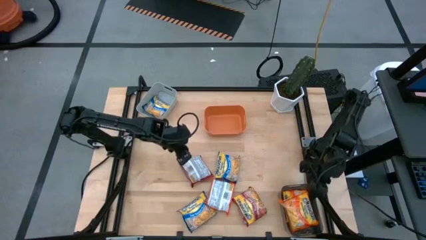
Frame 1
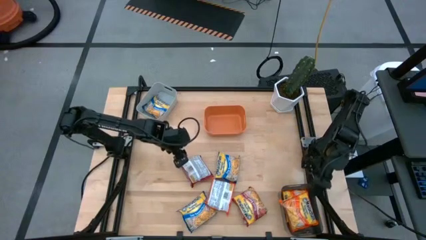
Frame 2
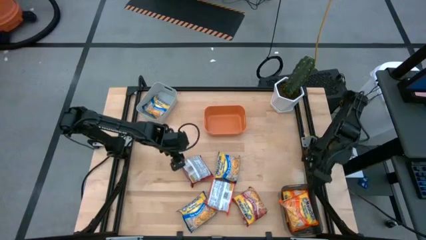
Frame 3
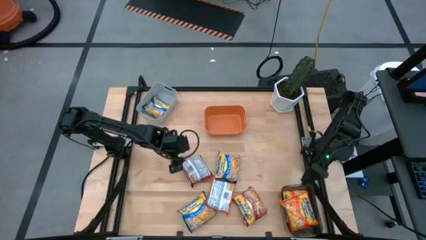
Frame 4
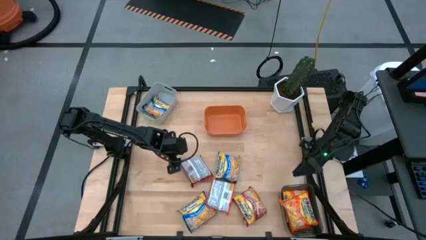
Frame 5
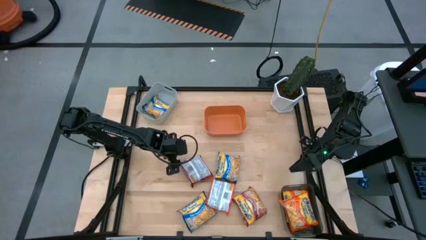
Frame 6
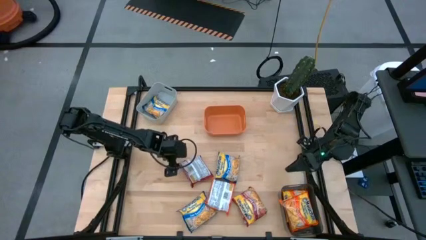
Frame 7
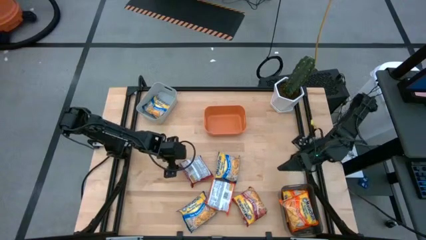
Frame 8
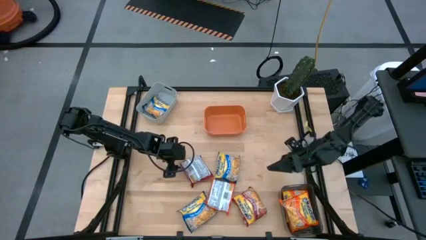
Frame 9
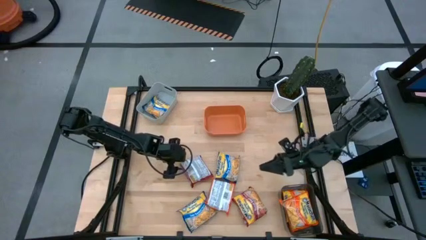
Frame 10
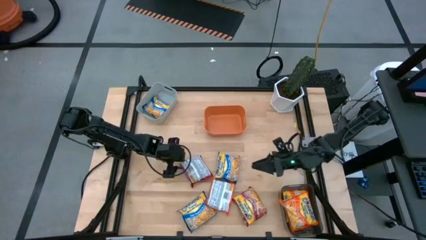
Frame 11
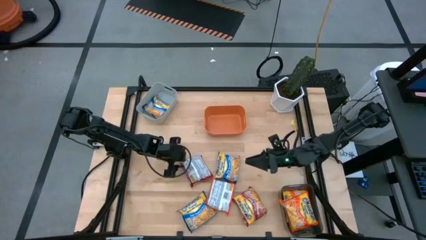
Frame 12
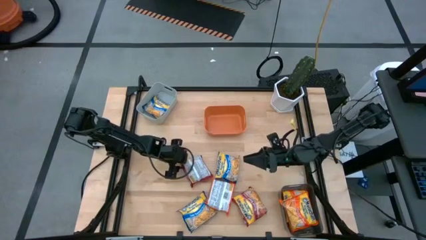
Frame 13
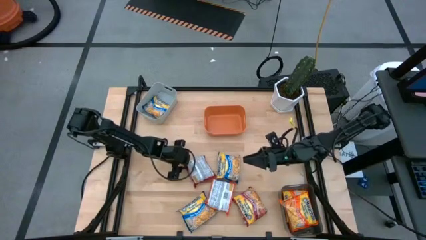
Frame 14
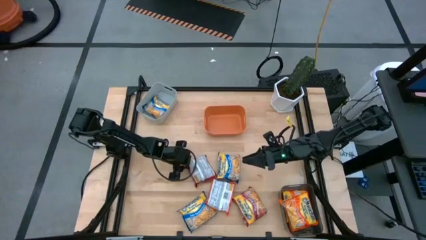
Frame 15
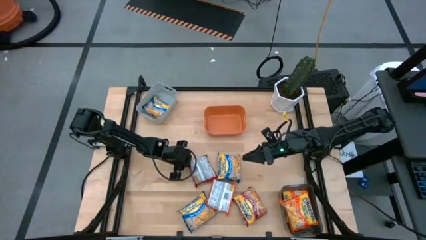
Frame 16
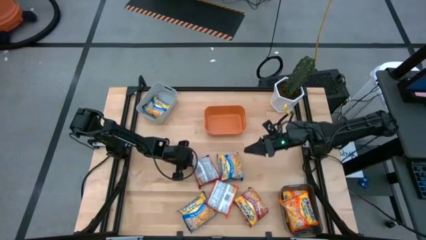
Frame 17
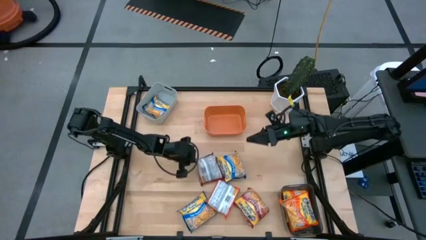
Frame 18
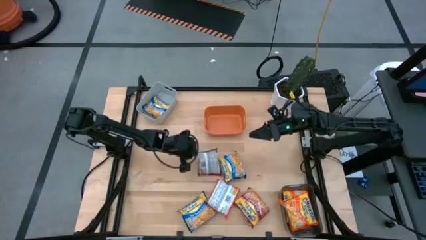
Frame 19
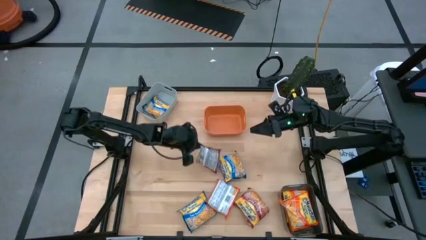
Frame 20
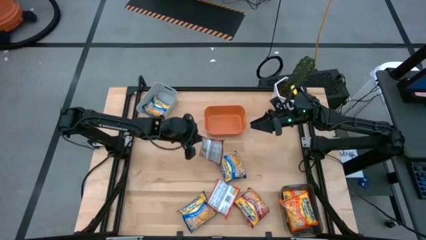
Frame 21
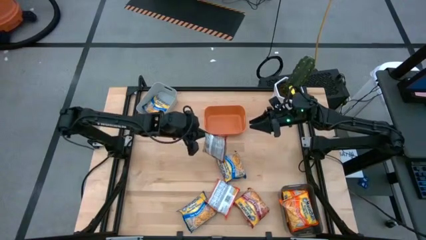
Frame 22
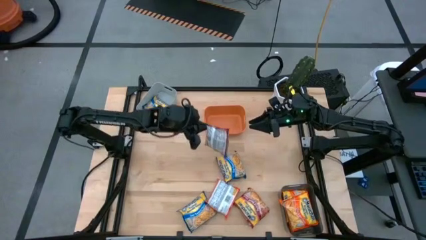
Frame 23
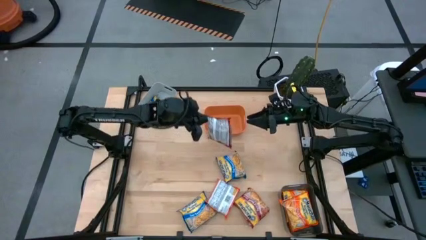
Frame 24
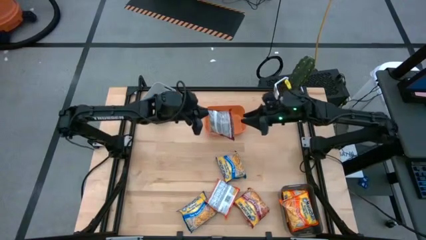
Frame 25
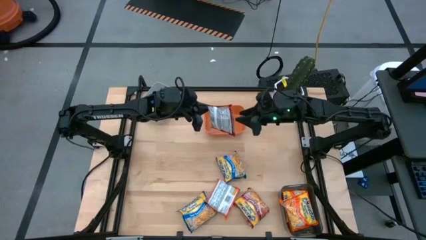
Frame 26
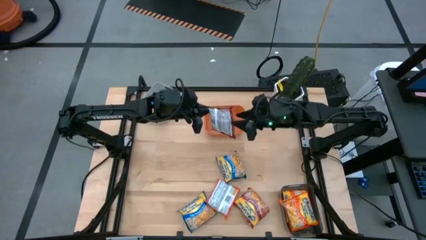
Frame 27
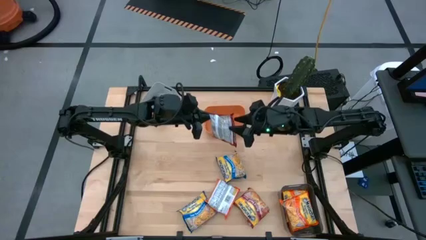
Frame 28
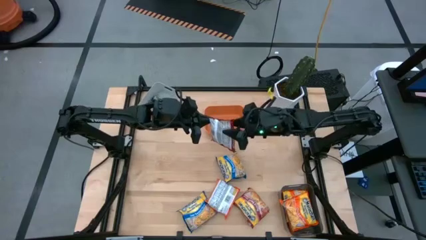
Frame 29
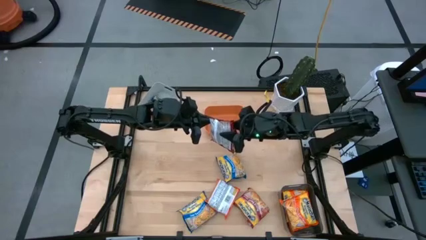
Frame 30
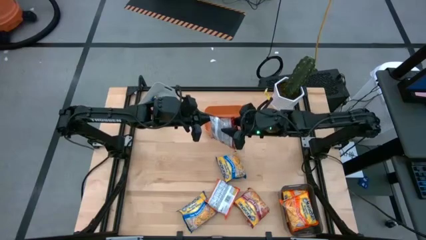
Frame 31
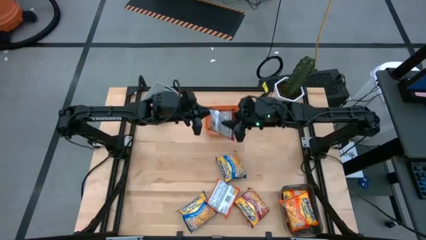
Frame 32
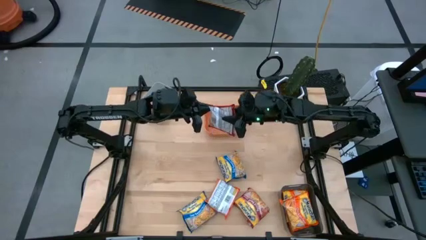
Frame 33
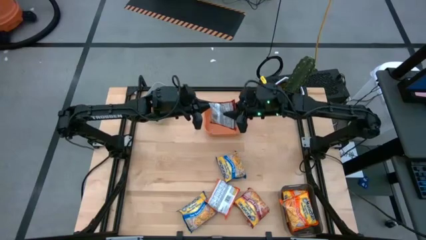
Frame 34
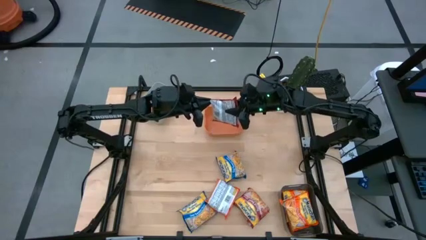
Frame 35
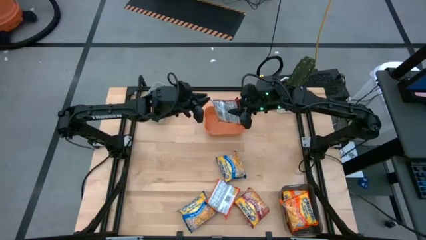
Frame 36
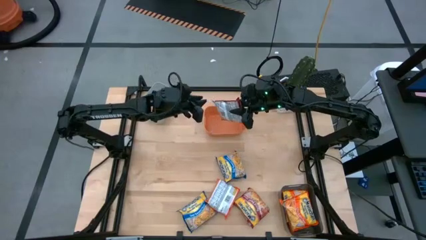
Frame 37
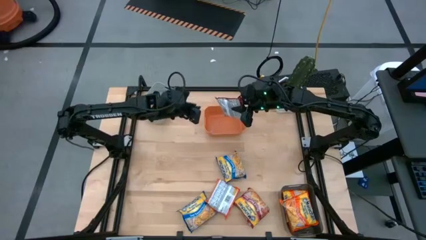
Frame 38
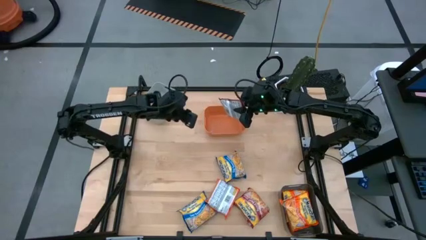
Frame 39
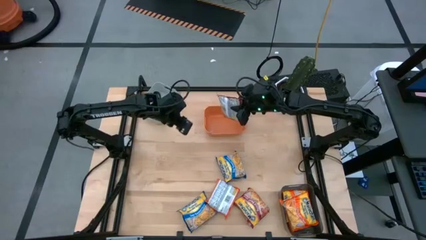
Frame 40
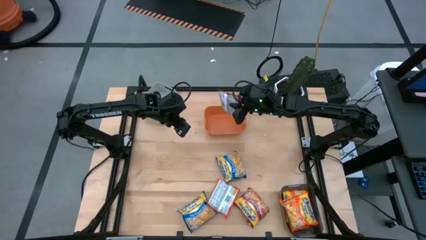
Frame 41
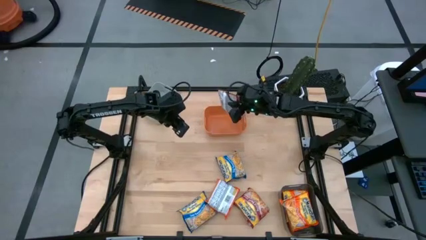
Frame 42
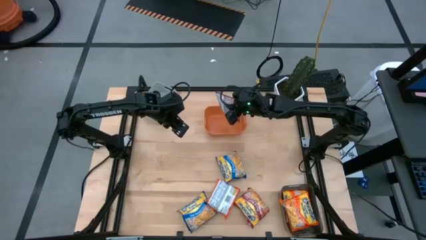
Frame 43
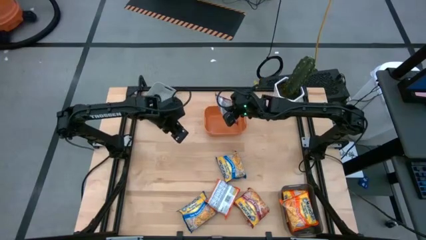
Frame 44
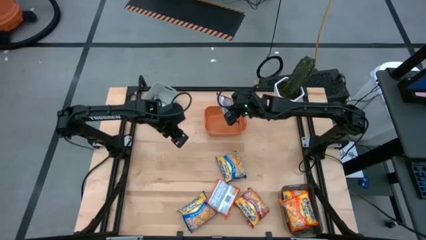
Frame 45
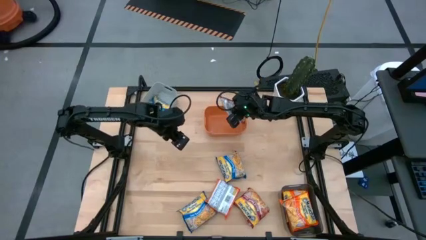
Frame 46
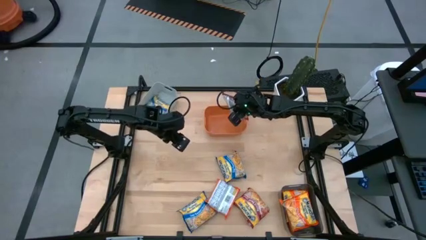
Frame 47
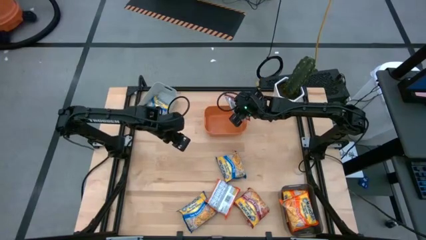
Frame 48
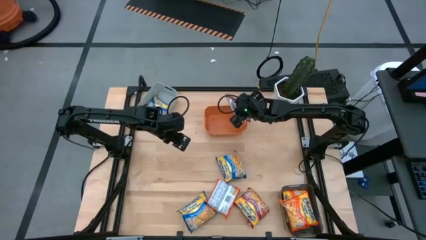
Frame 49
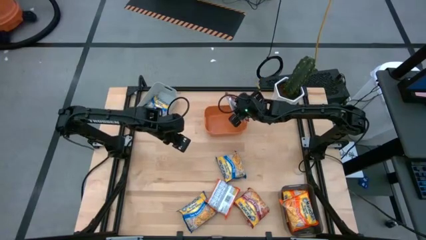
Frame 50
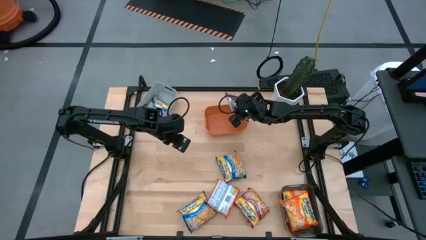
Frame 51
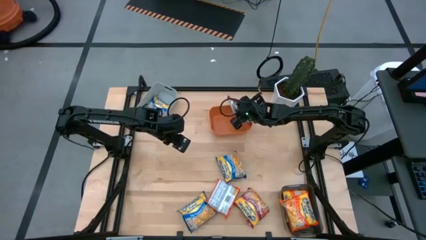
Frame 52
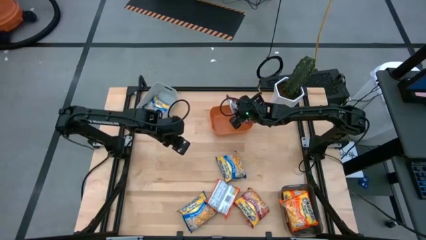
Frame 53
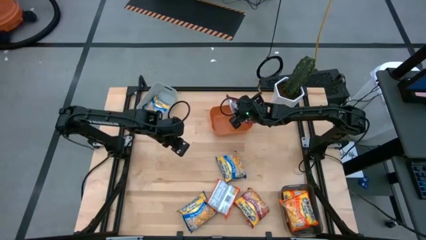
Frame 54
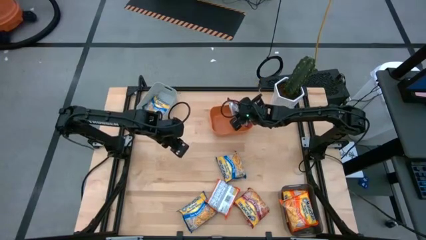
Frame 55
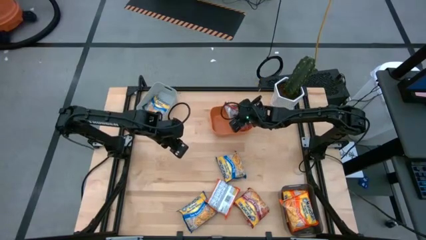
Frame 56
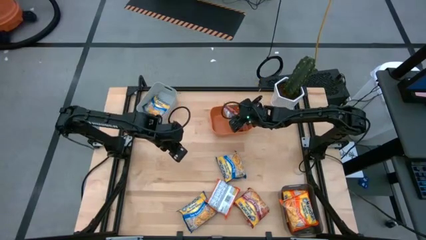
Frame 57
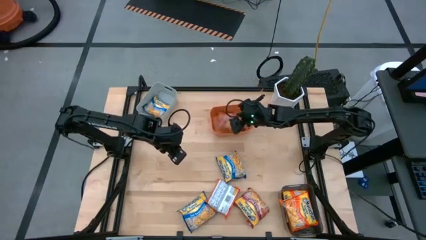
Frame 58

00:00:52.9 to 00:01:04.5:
Task: Sort Maruchan noodles
Put the top red noodle pack into the orange bin

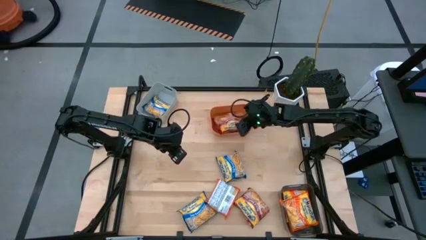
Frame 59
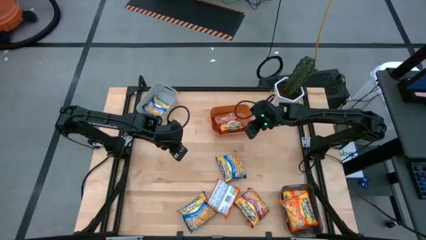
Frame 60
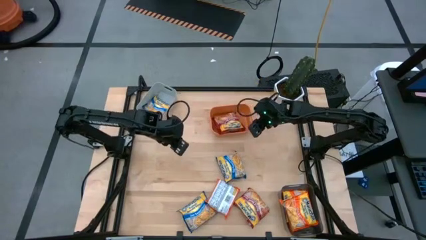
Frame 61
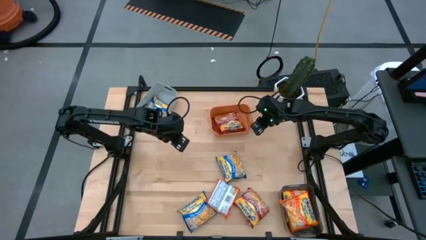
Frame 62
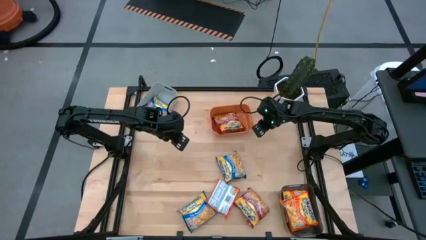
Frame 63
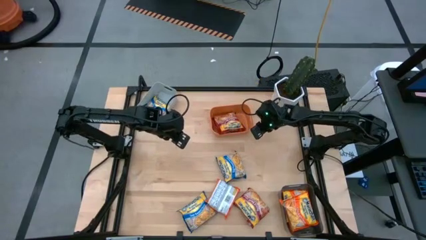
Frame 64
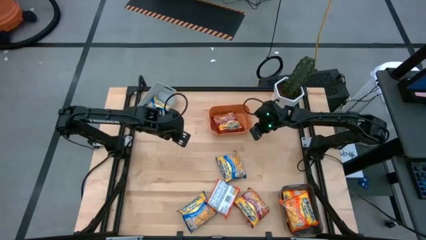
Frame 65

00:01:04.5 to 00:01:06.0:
Adjust the orange bin

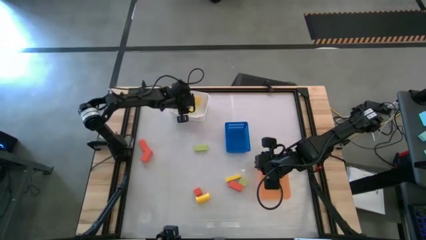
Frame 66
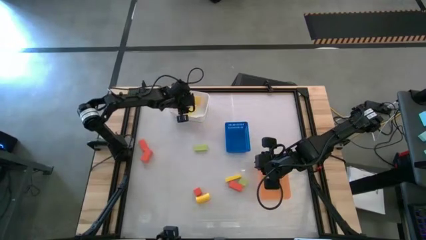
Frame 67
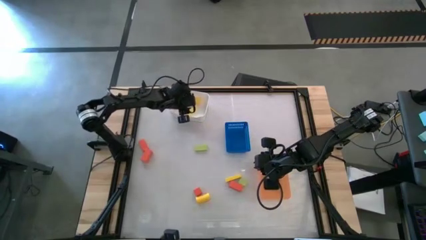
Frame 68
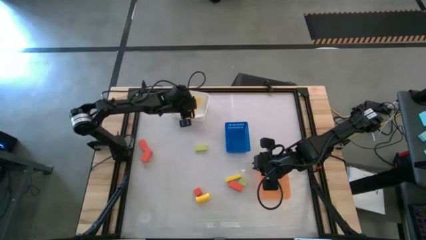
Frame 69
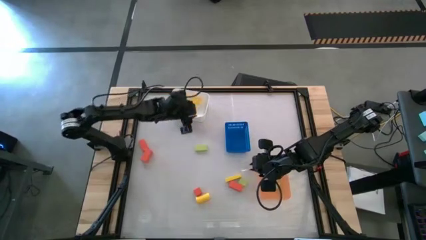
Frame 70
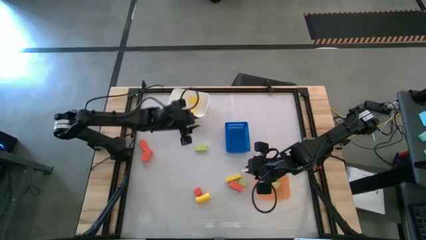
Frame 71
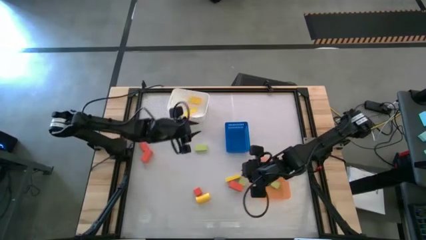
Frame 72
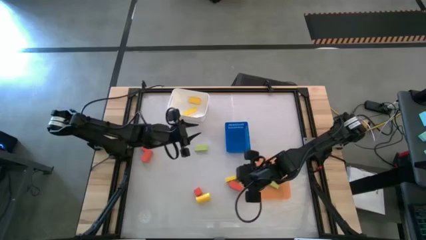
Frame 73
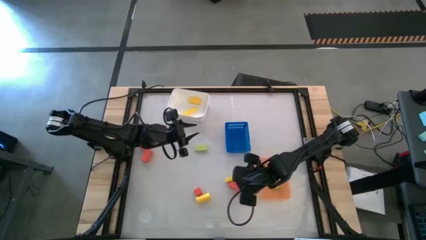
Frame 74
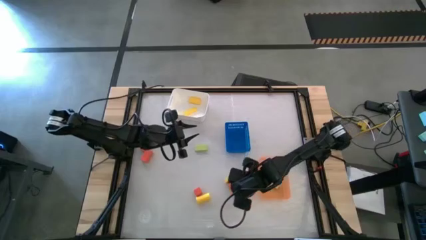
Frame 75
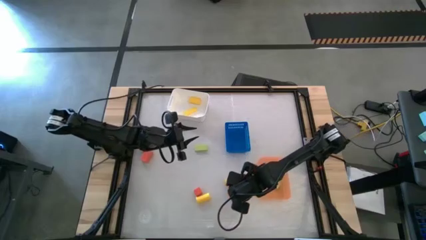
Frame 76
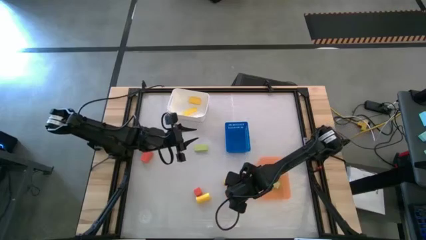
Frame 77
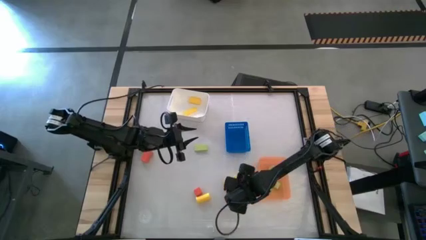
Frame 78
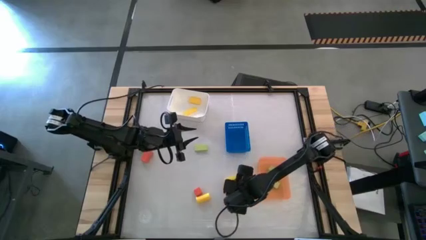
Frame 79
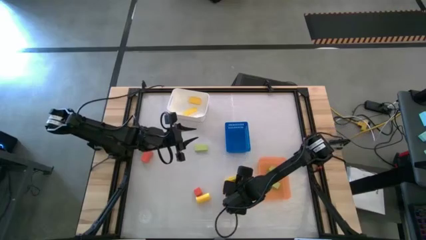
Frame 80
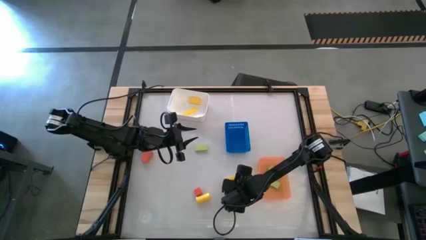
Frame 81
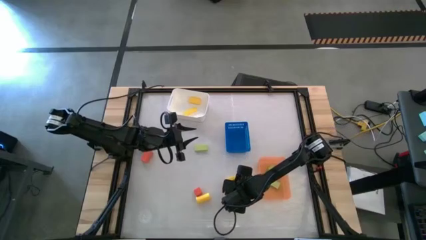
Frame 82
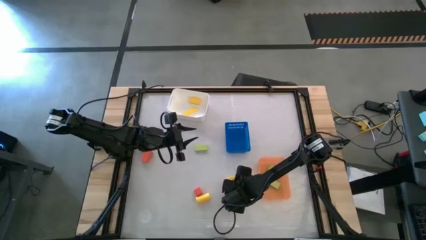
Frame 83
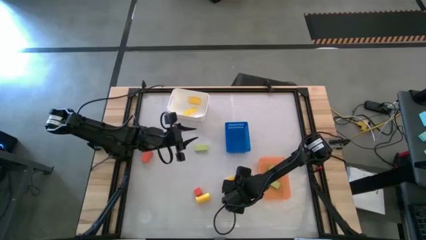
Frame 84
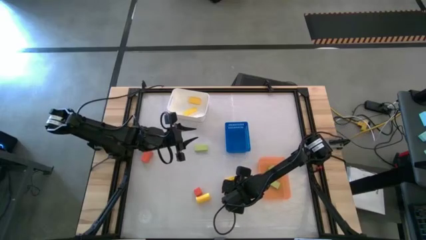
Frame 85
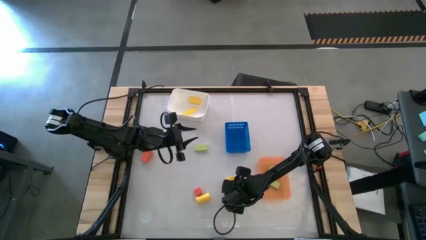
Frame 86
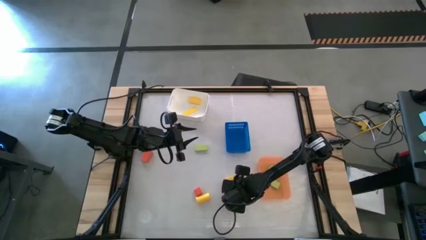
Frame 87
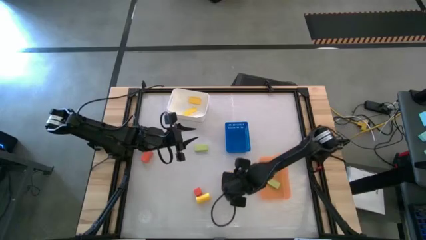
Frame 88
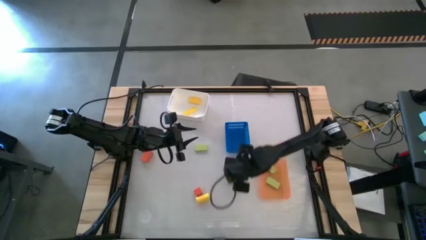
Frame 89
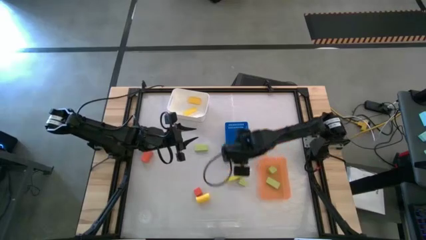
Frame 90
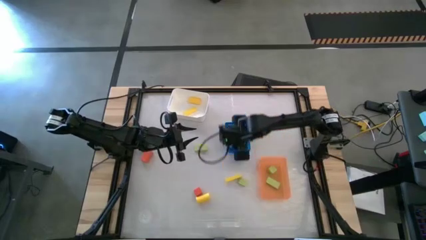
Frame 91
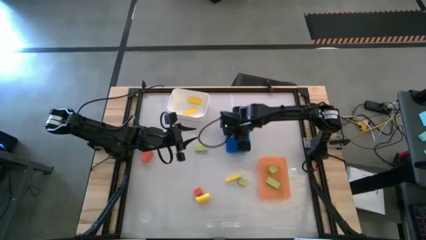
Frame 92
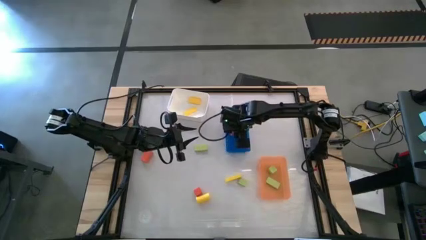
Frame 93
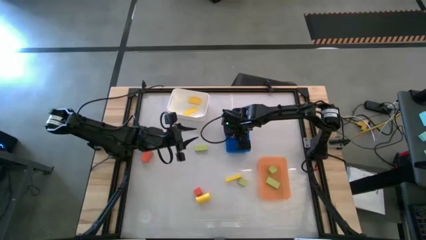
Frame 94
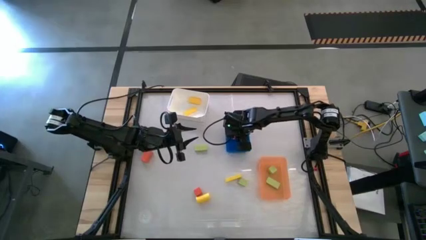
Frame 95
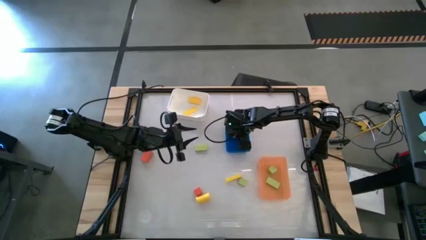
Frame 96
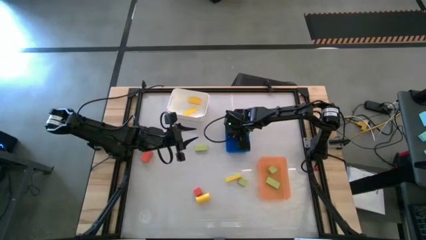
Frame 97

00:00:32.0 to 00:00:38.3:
Task: Sort & place blocks by color
Put the orange block into the blue bin
